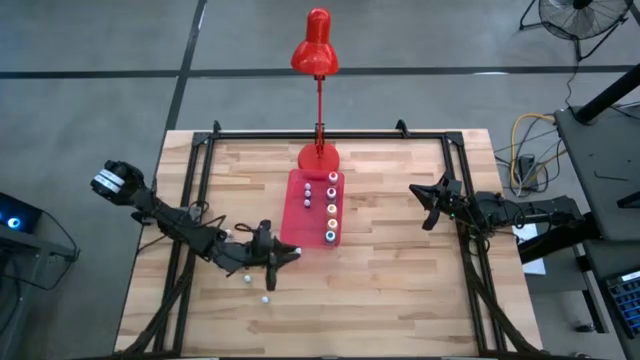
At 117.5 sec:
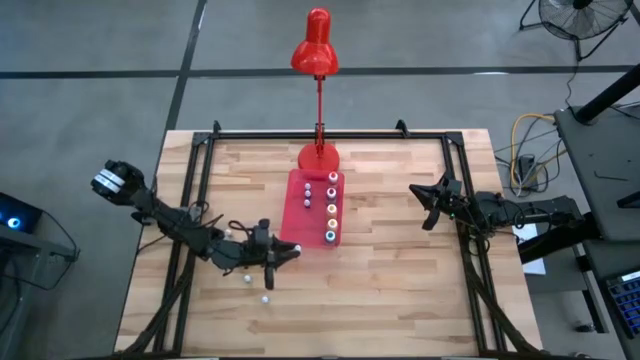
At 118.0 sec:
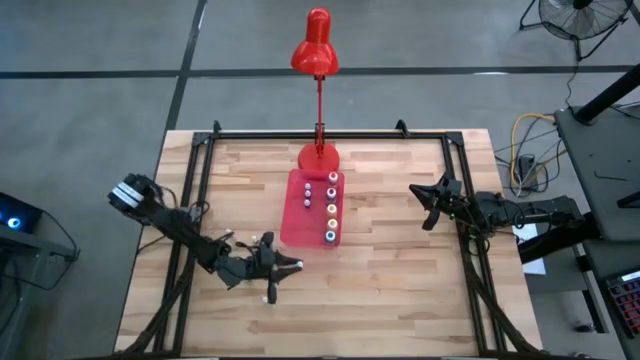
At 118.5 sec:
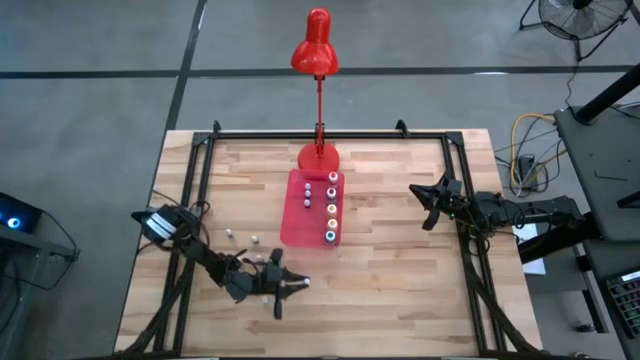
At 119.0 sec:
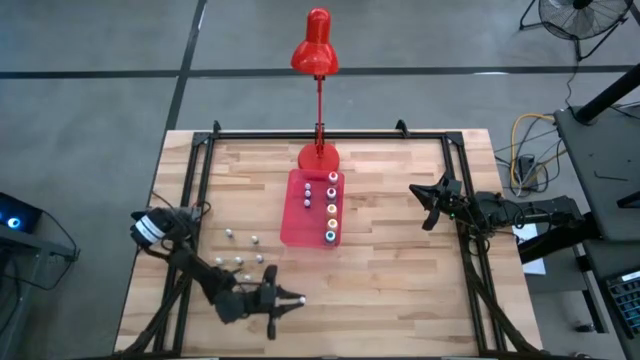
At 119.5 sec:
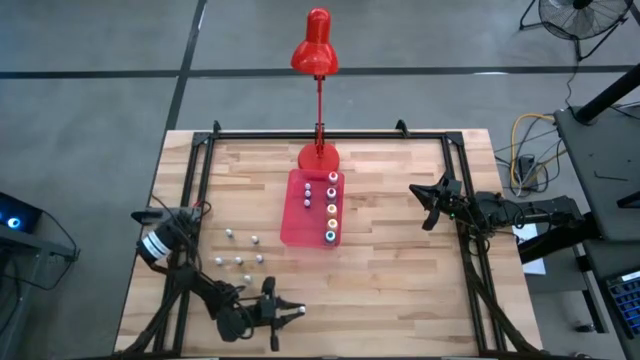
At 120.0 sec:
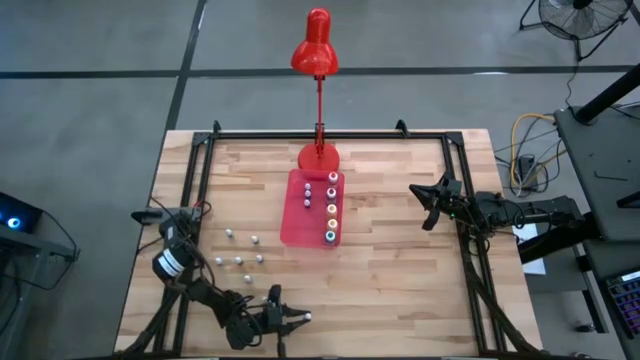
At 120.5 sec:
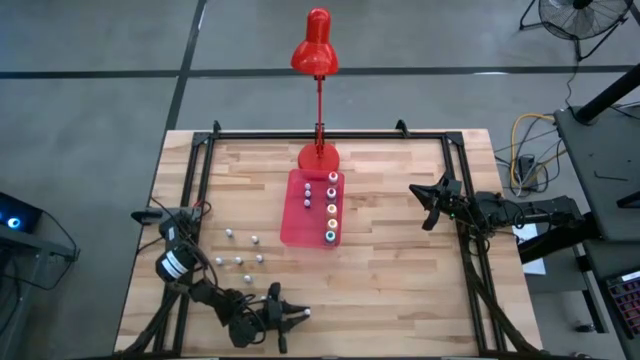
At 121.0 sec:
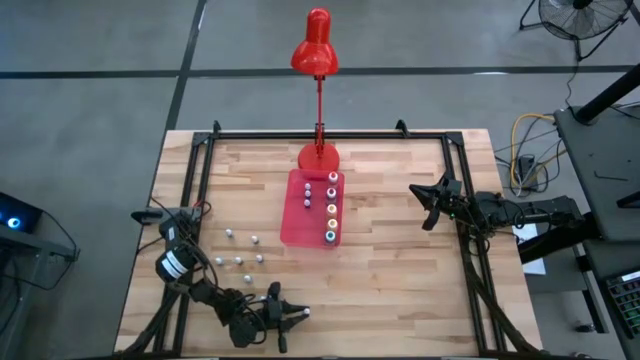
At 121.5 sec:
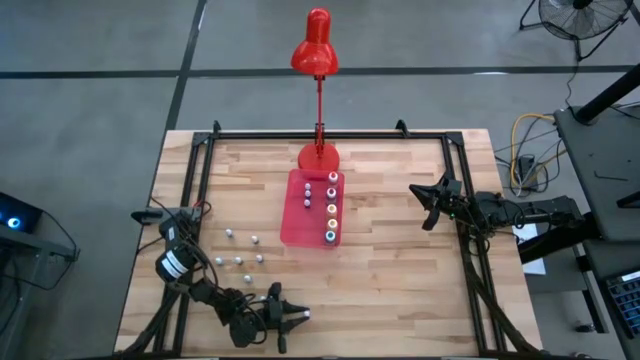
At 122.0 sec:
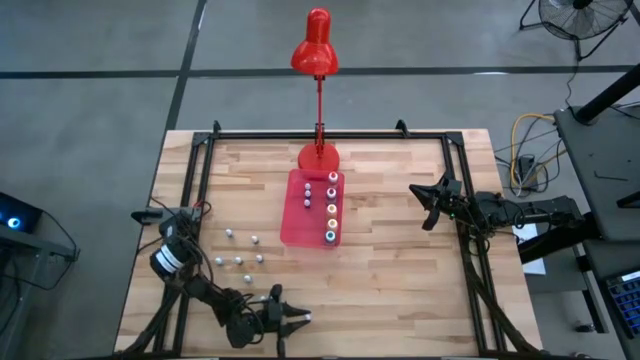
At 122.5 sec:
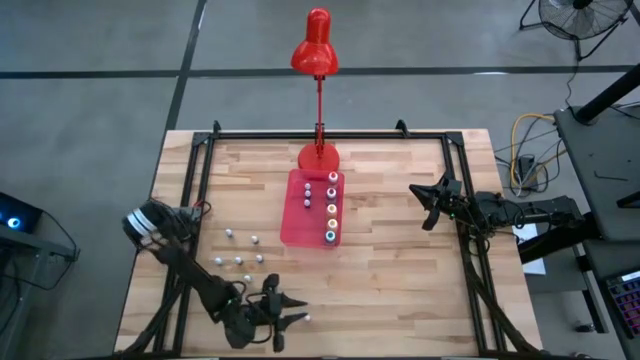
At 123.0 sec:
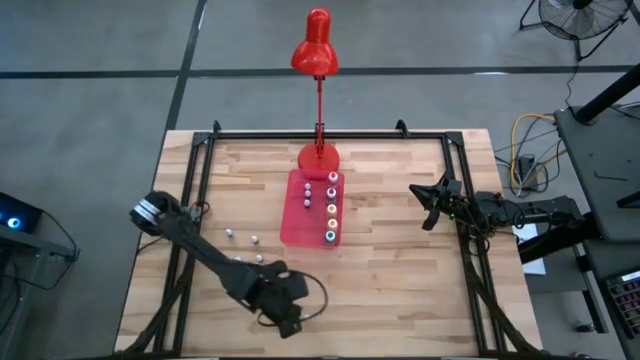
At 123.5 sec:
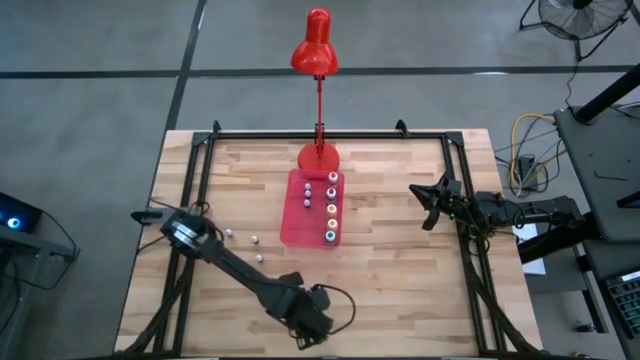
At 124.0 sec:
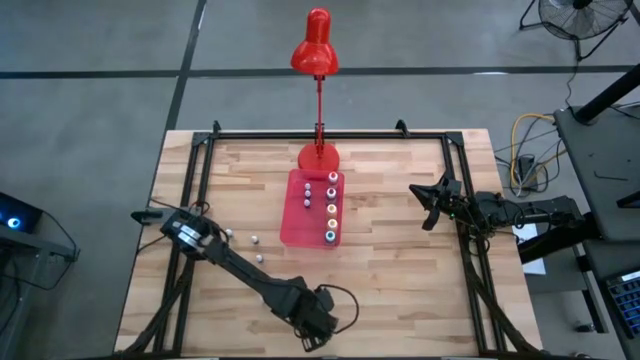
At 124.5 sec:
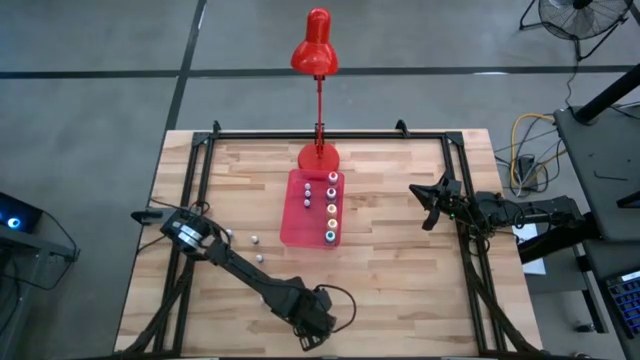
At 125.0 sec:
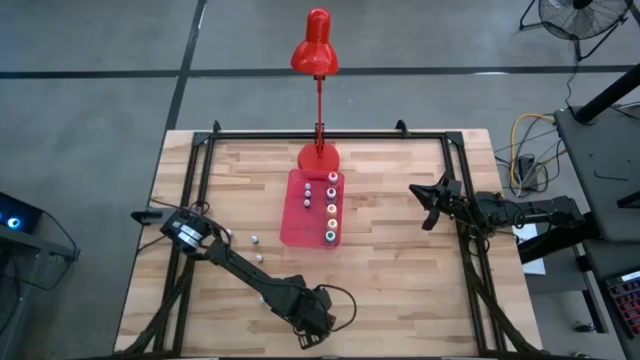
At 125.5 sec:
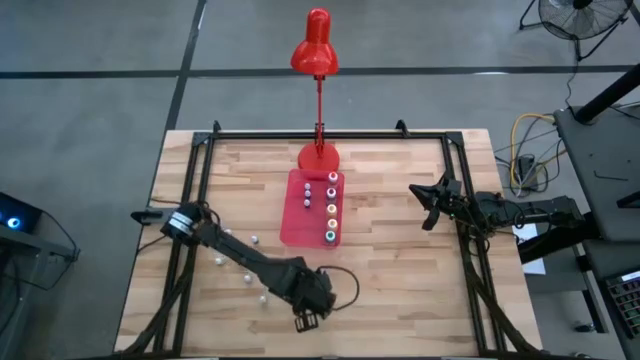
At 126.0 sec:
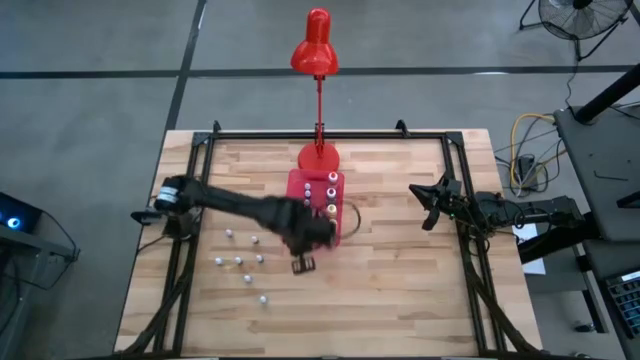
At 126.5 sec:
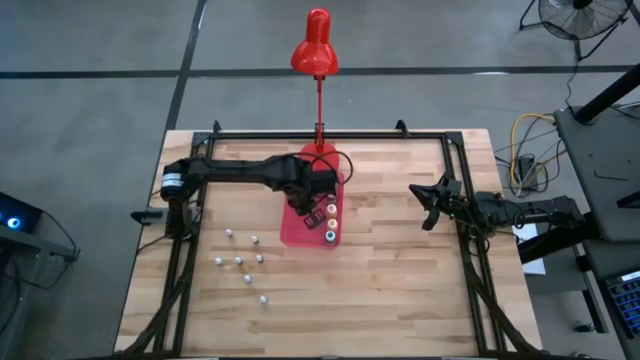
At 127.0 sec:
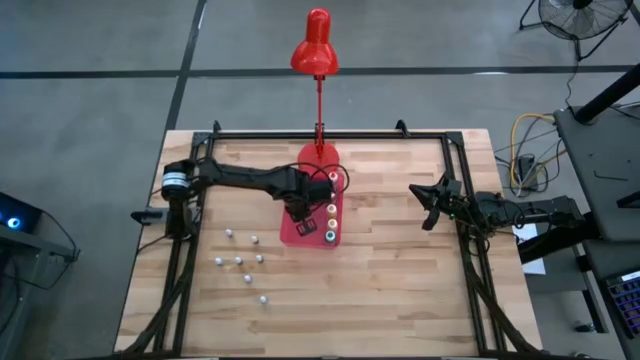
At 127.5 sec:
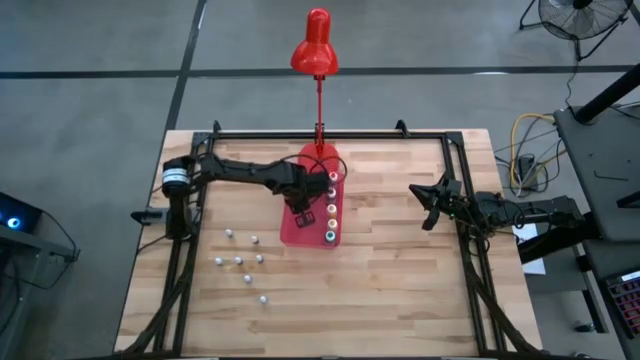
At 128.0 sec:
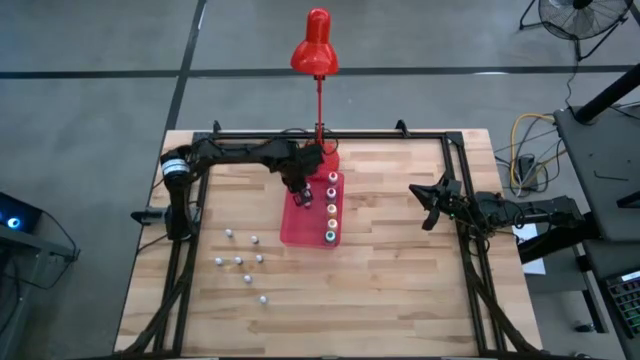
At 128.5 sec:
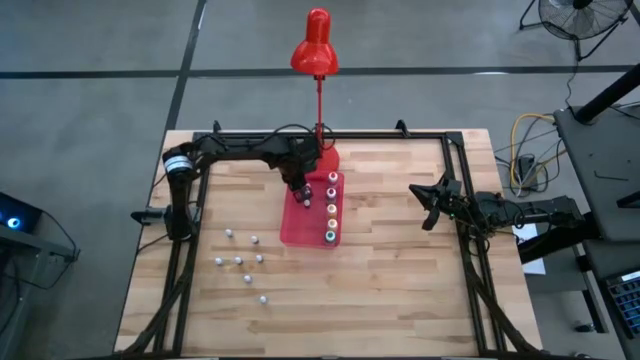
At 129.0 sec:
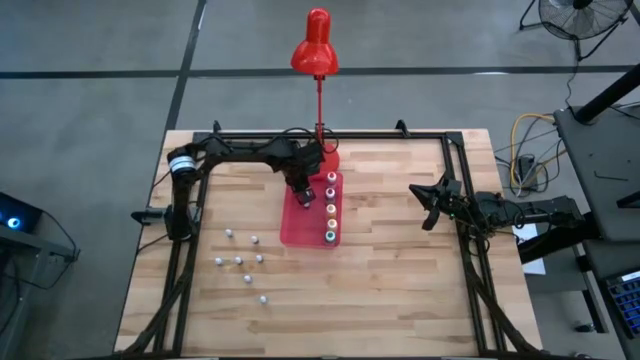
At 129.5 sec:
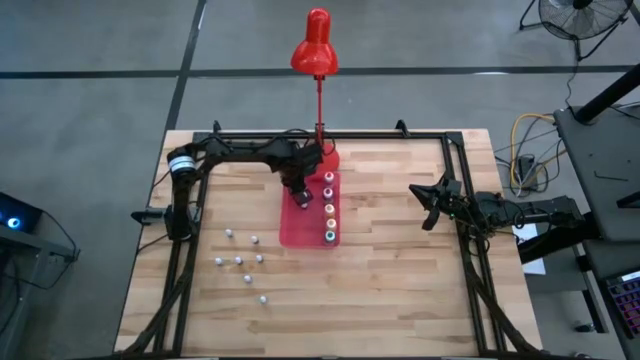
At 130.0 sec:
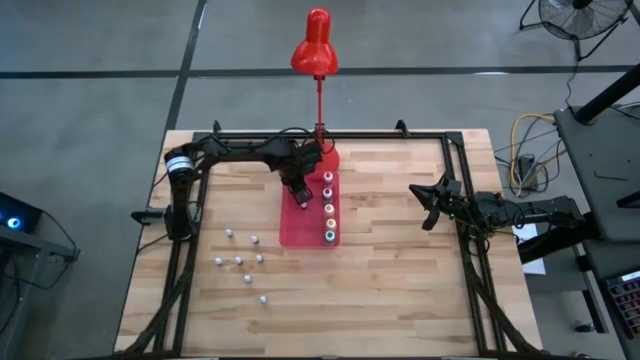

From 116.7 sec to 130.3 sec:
Task: Pick & Place food coloring
Put the small orange food coloring bottle into the pink bin

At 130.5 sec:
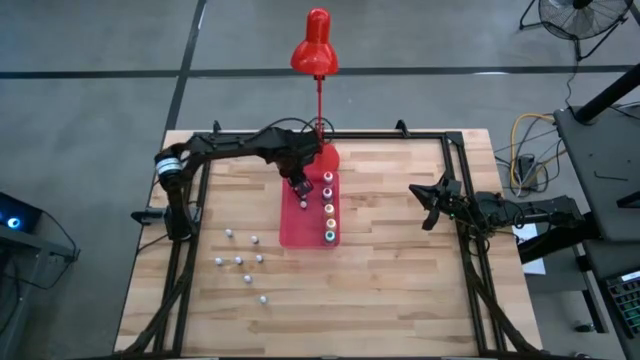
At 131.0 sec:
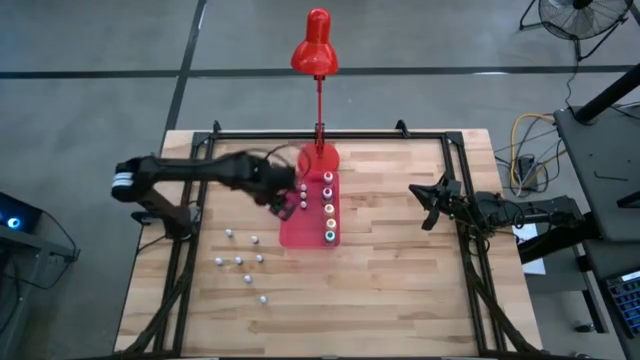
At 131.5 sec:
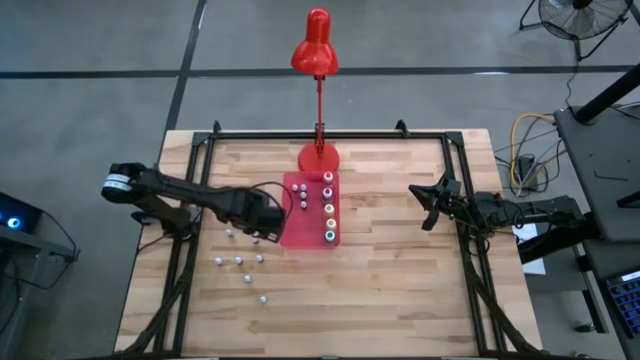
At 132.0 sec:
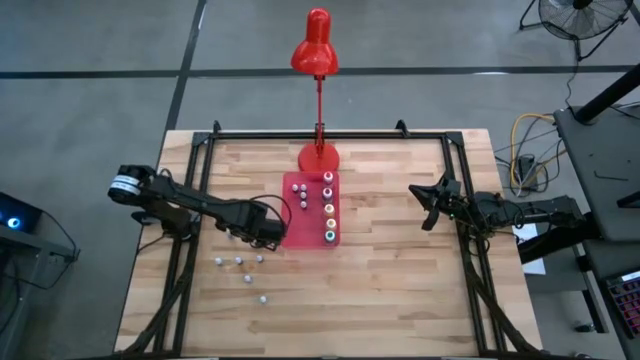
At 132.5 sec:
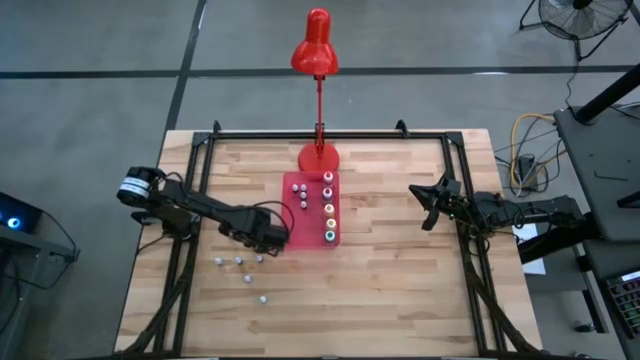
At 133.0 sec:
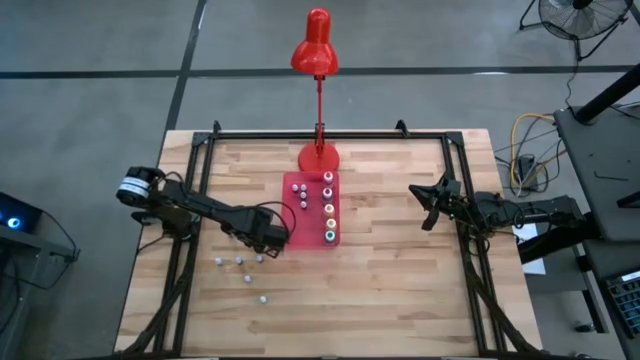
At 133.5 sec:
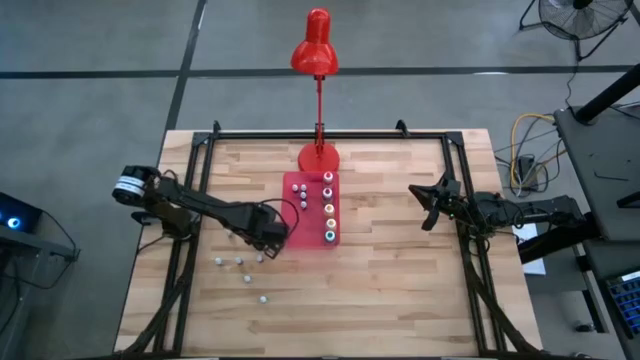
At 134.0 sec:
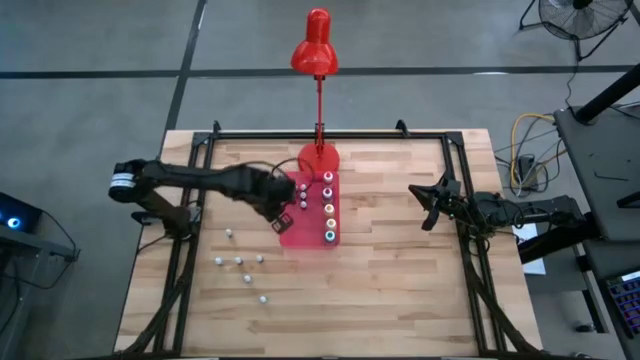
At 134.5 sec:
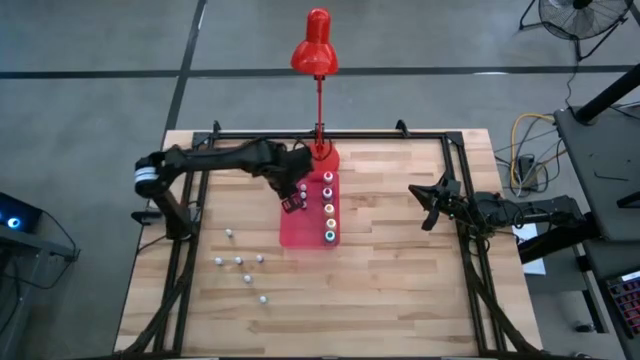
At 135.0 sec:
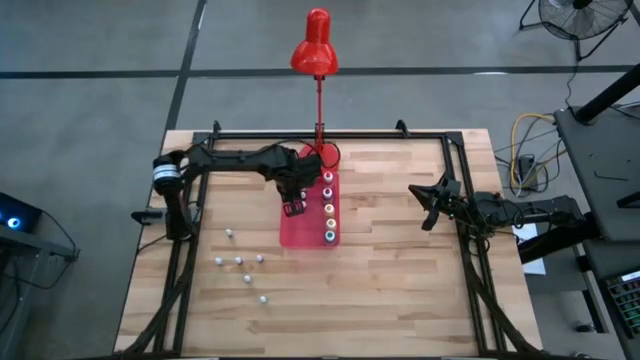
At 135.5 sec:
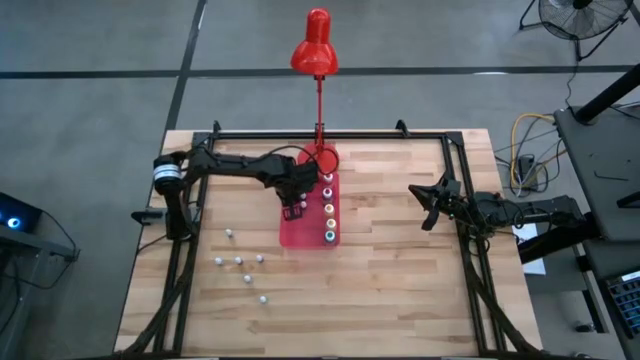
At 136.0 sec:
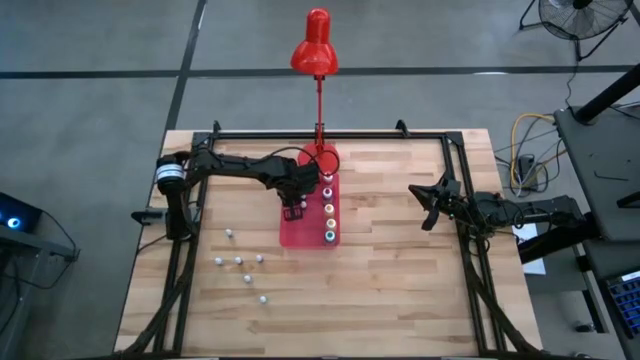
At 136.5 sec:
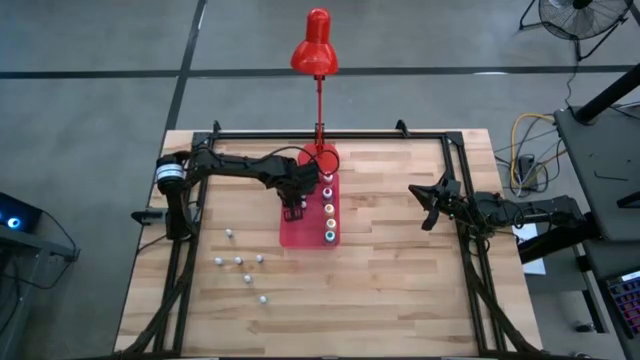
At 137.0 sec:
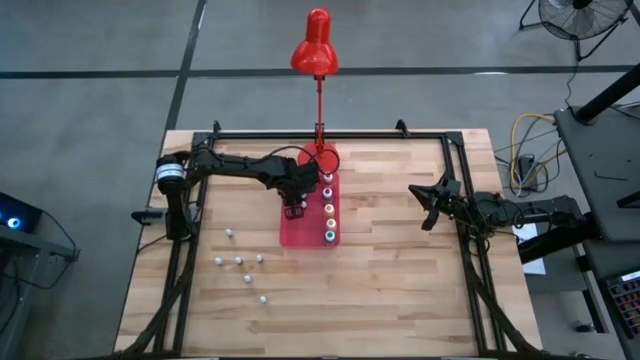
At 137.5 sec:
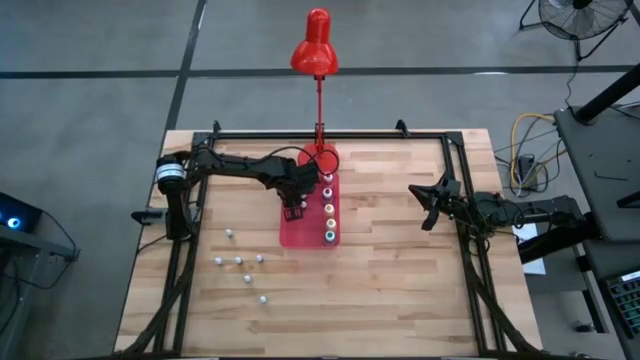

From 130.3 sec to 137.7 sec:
Put the small black food coloring bottle into the pink bin
